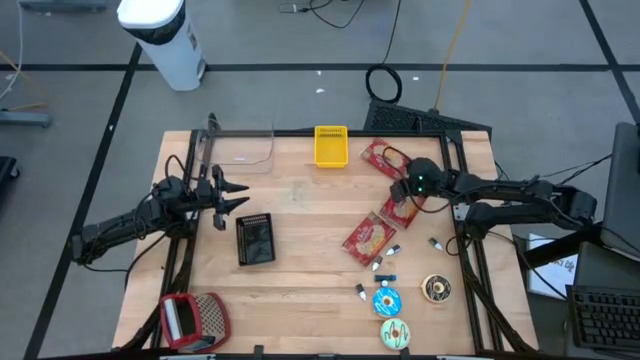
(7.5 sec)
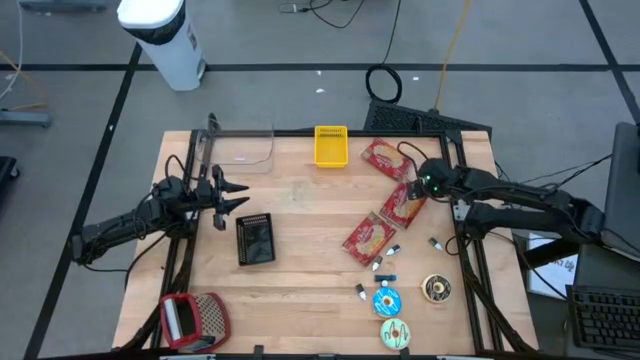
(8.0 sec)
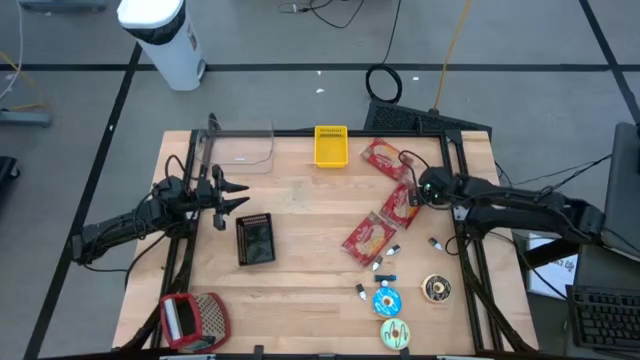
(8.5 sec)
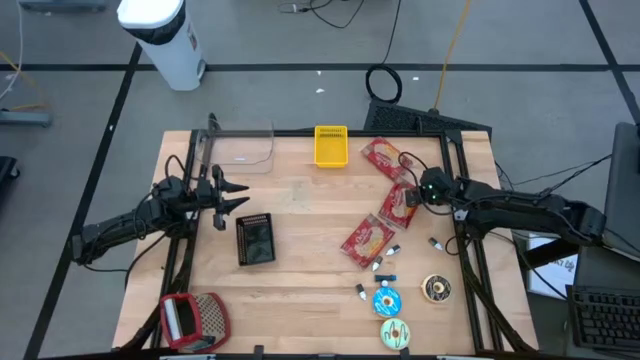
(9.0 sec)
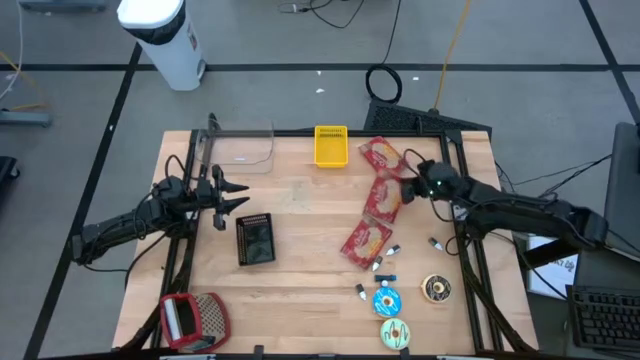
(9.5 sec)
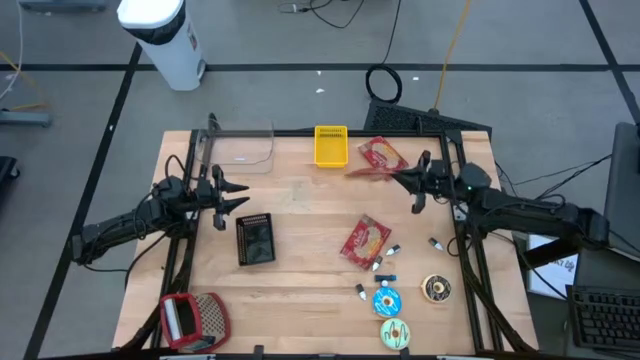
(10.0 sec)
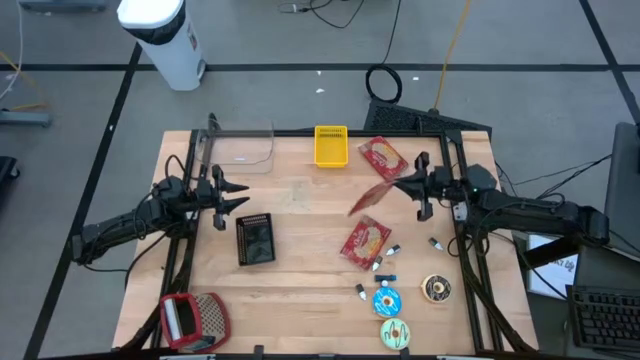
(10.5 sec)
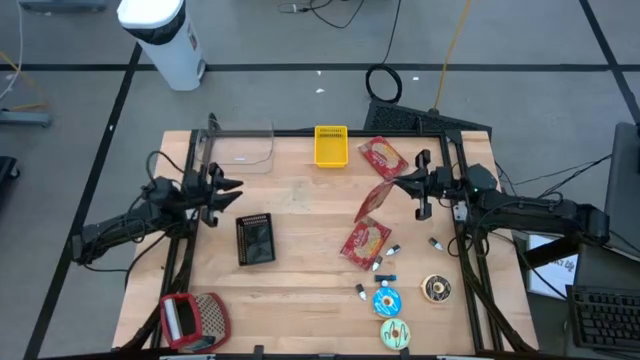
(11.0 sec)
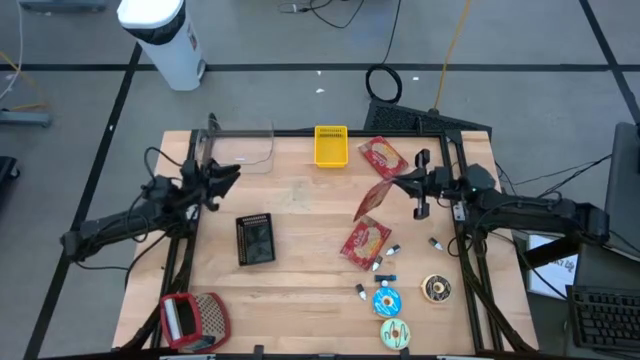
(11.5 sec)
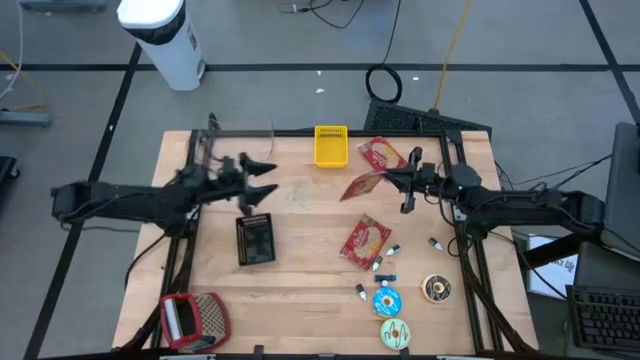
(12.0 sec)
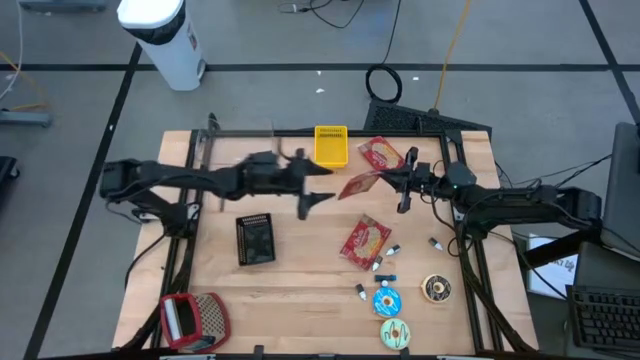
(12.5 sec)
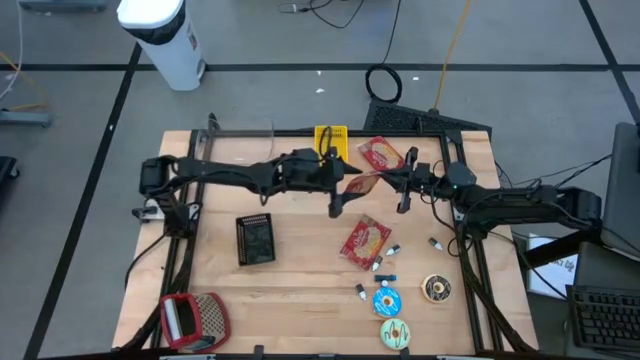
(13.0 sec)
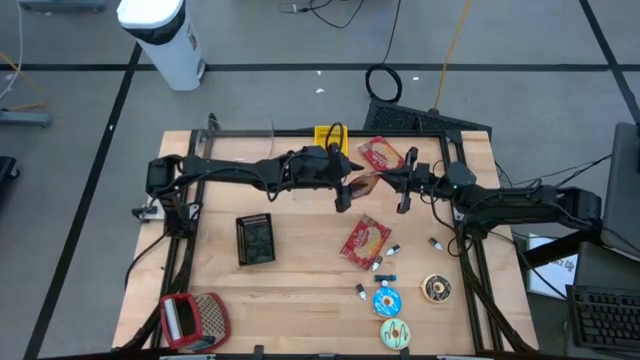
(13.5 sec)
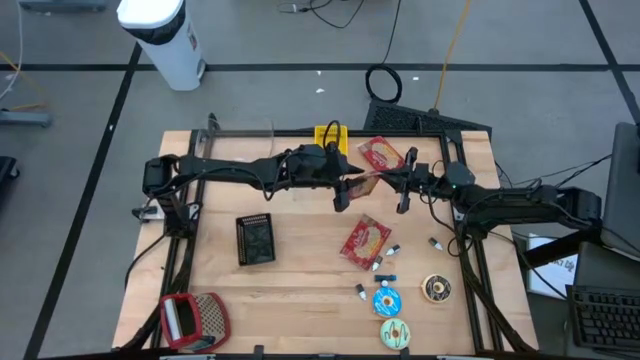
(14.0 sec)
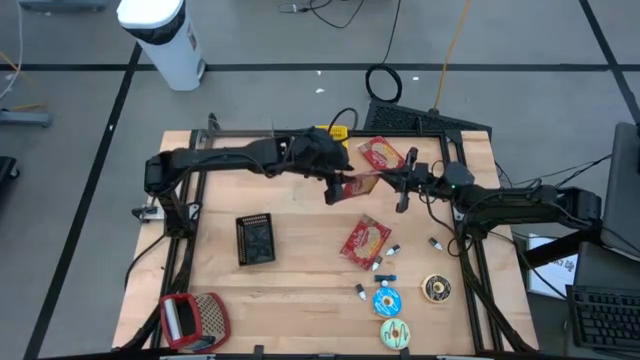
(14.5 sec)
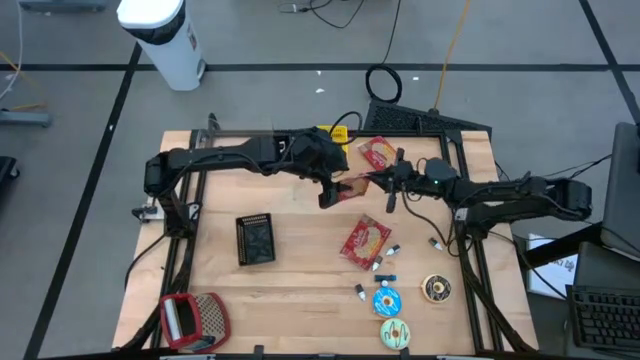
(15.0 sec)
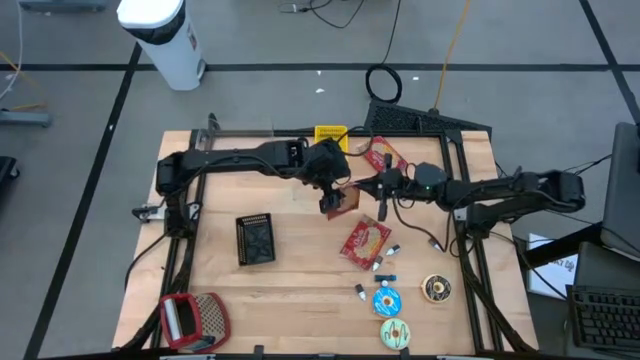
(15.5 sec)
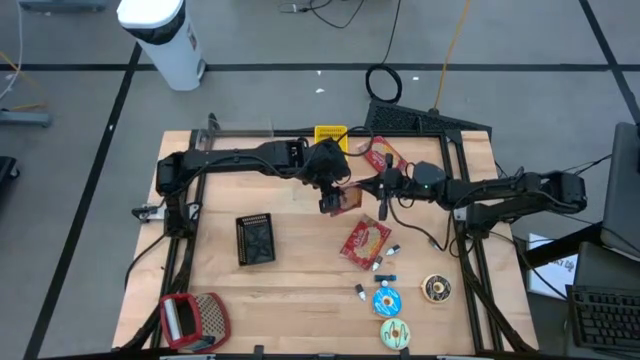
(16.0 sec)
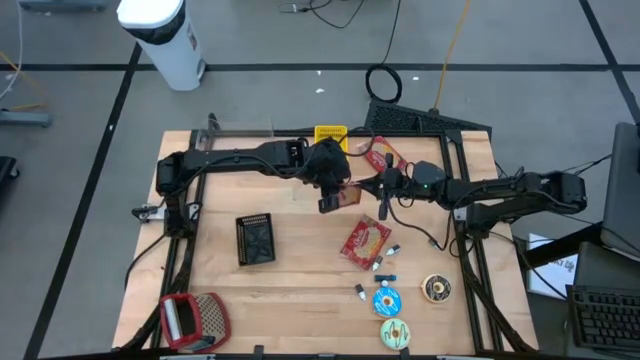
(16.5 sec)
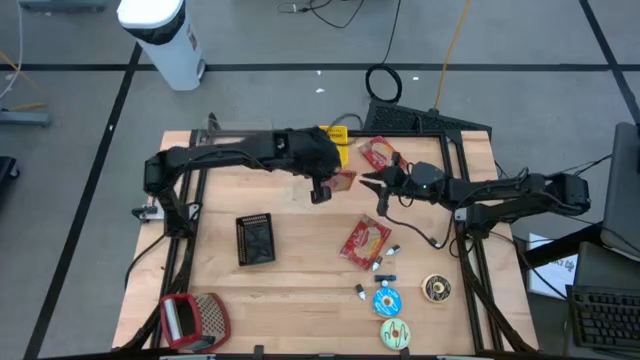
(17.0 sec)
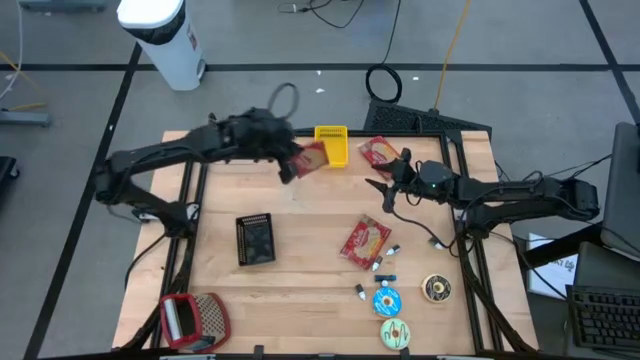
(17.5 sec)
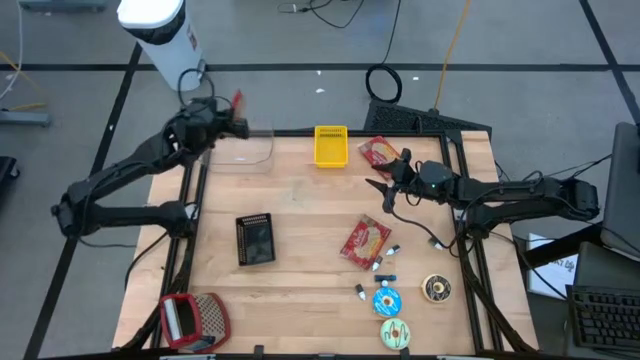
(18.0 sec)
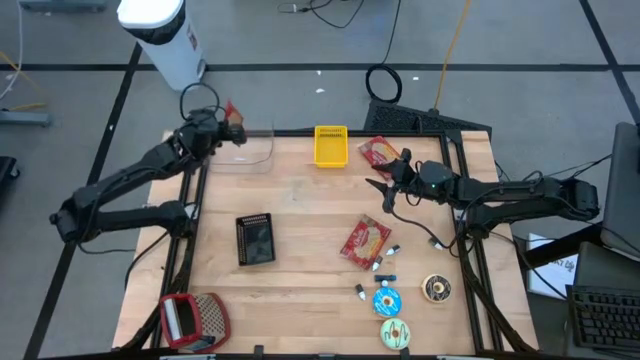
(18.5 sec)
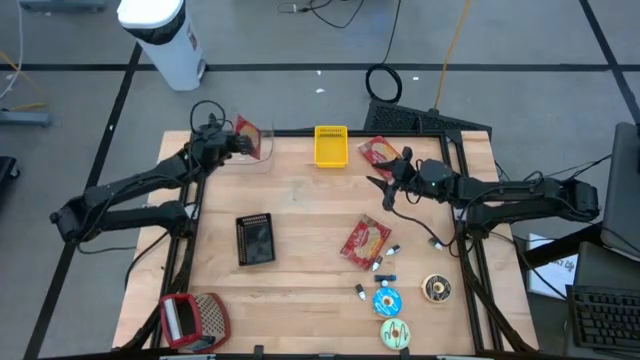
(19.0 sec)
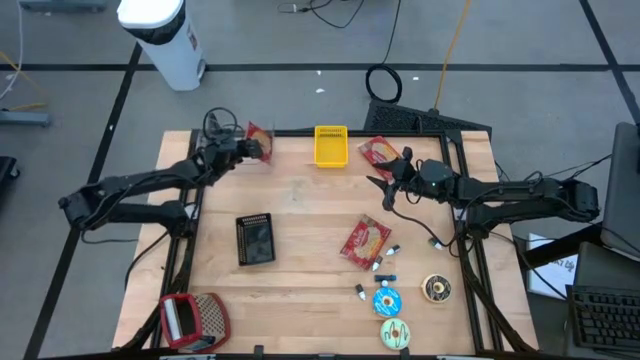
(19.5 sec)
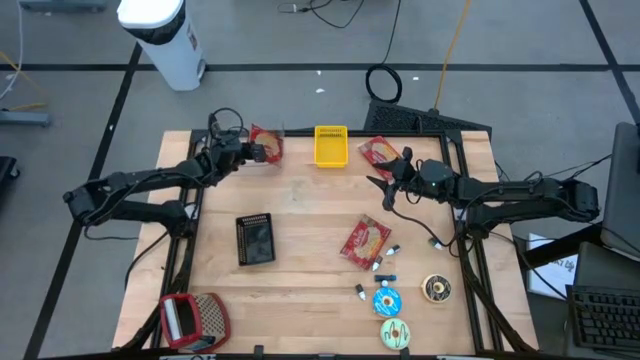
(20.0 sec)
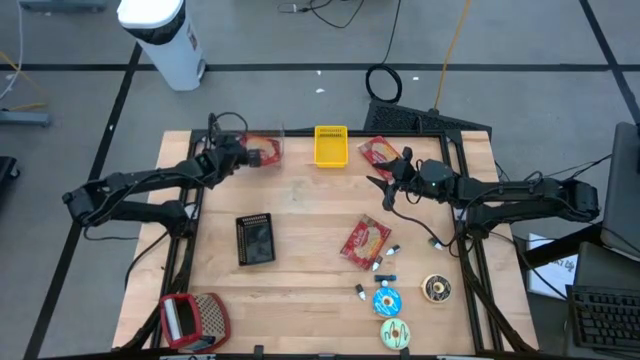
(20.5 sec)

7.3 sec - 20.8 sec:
Task: Pick & Place Food Item
Put the middle popcorn pack into the transparent bin

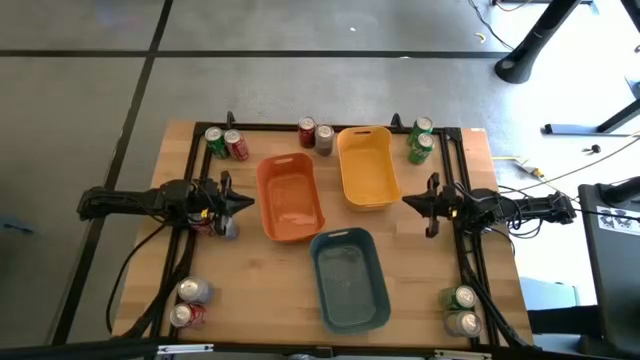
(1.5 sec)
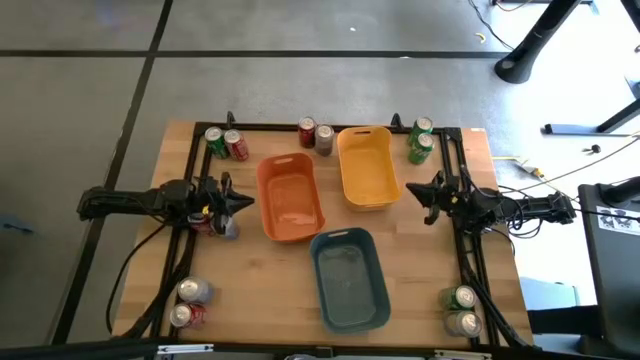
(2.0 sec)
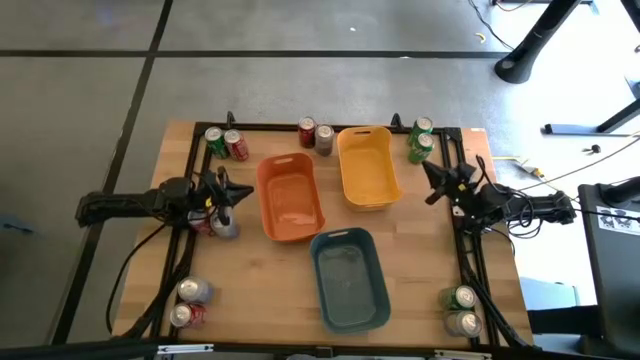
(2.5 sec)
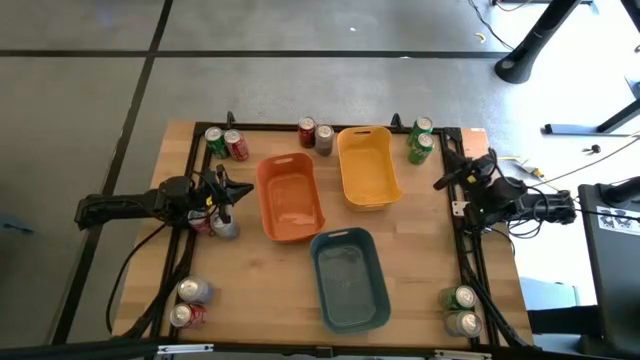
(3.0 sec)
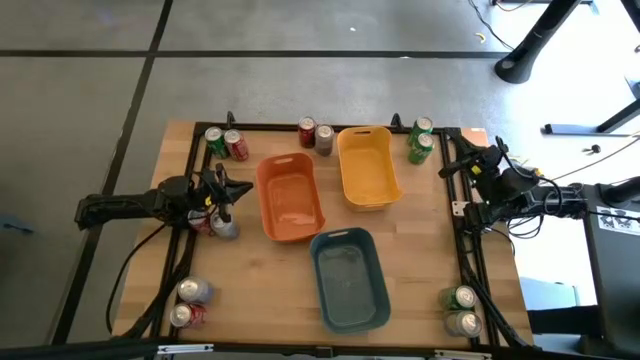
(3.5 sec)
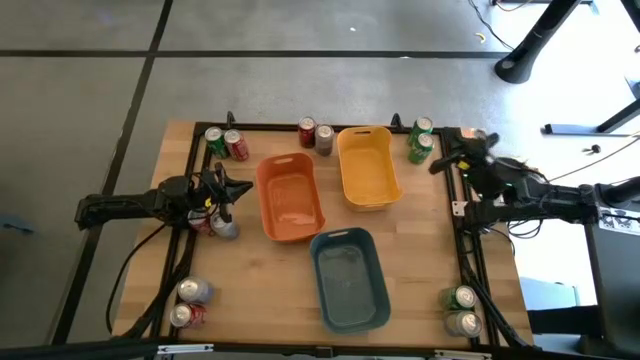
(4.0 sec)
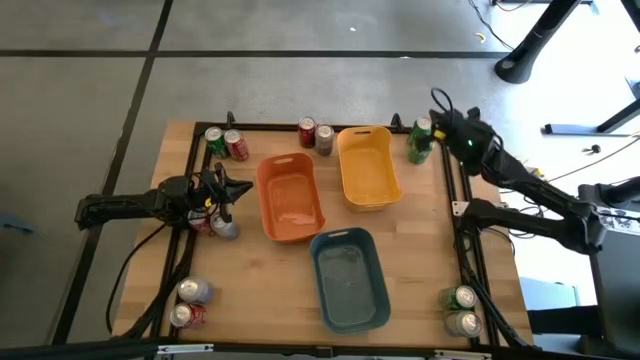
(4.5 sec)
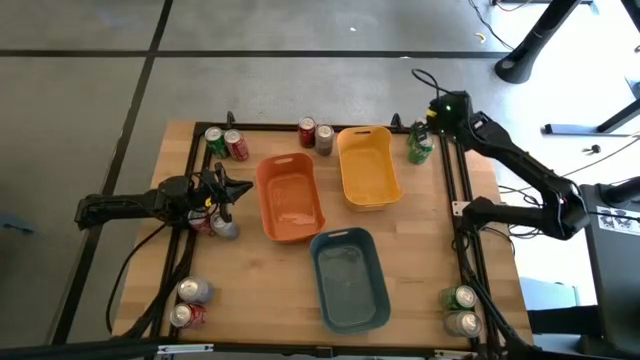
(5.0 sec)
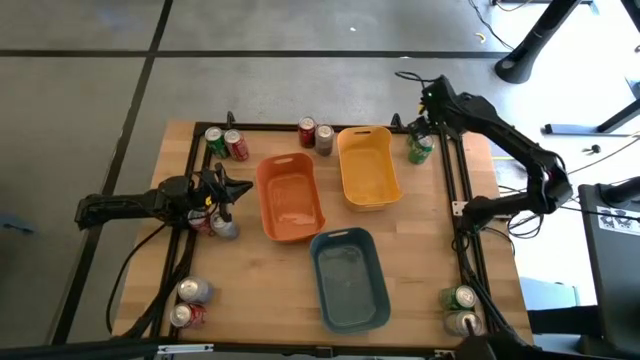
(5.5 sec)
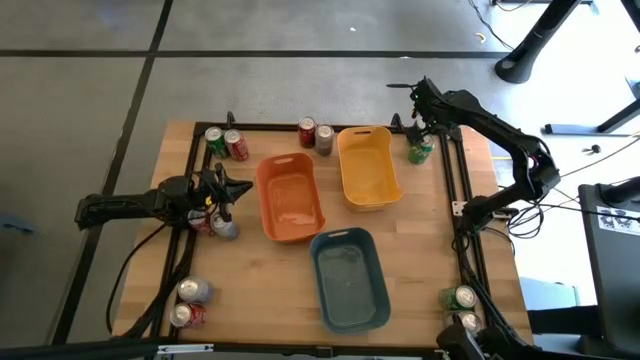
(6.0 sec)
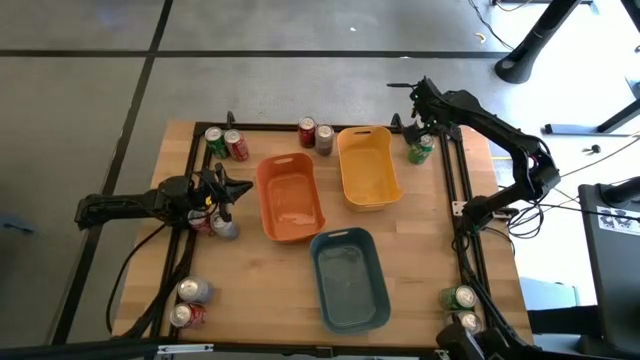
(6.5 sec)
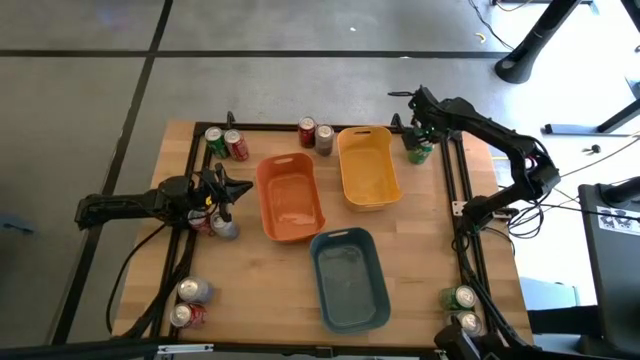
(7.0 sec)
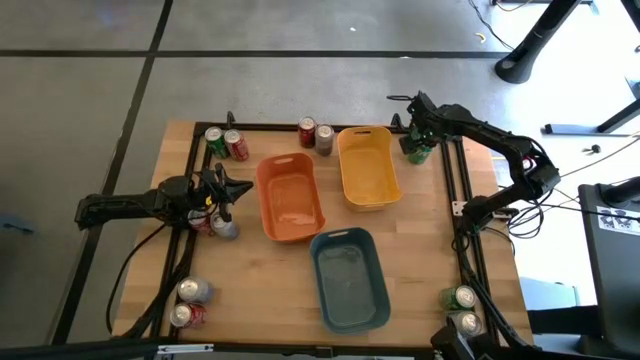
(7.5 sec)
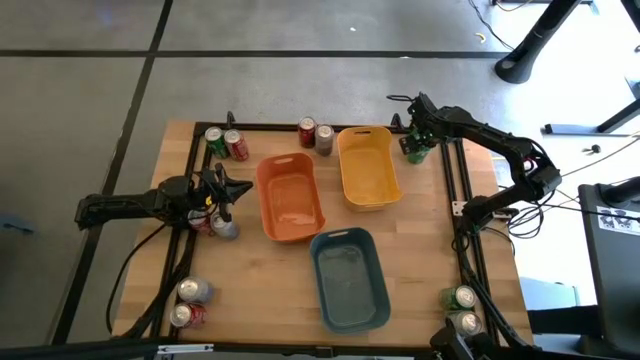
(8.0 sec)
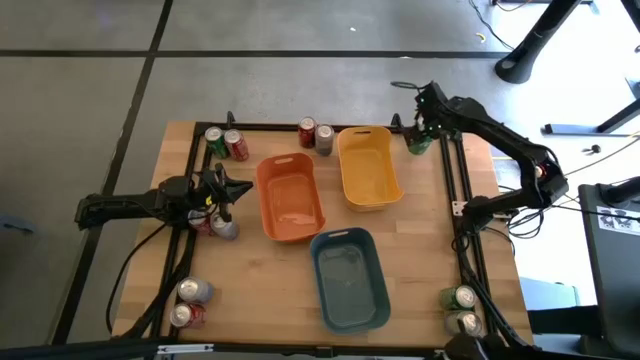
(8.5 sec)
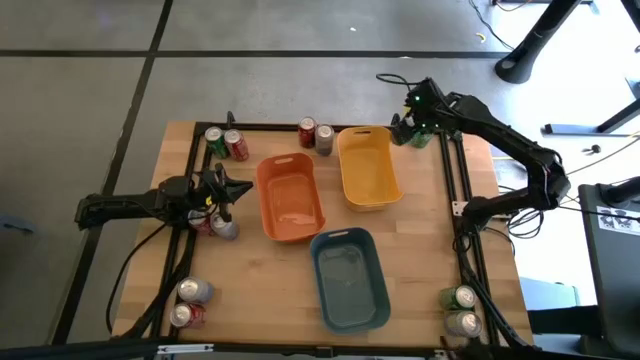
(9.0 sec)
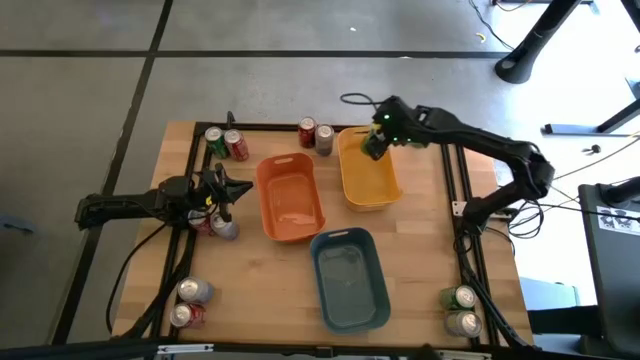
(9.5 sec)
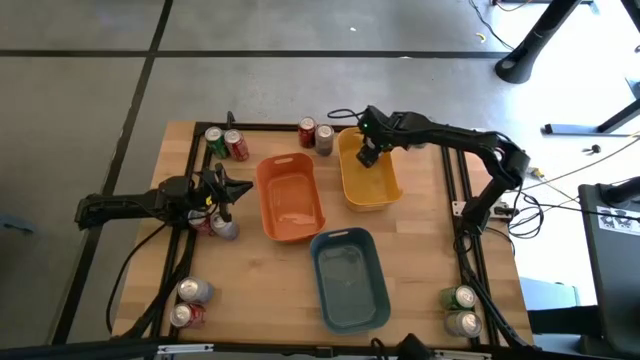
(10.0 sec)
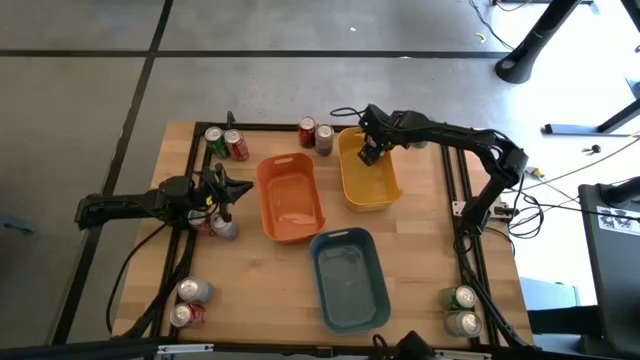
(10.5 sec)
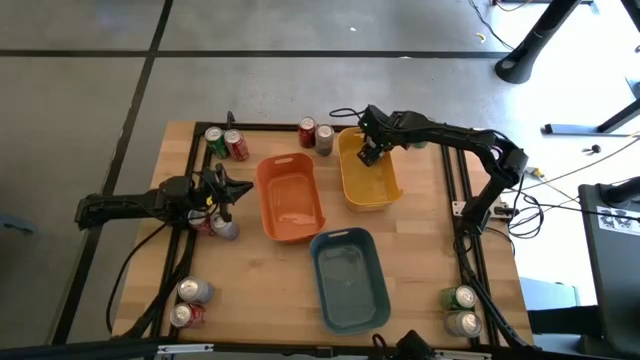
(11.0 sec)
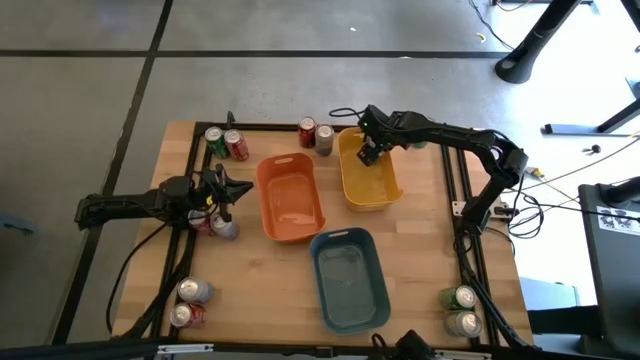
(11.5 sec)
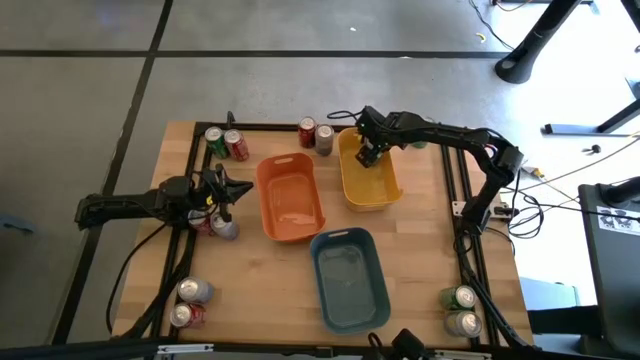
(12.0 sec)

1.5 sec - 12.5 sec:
Task: Sort soda cans
Put the green soda can into the yellow bin
